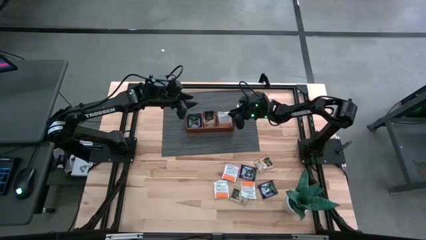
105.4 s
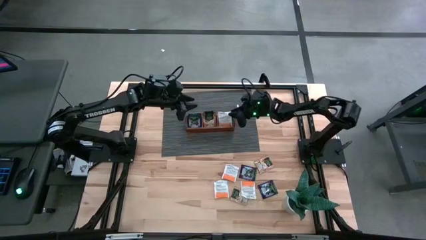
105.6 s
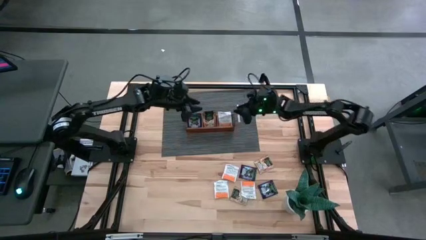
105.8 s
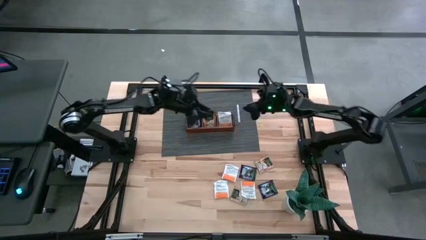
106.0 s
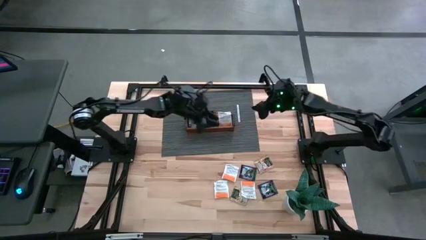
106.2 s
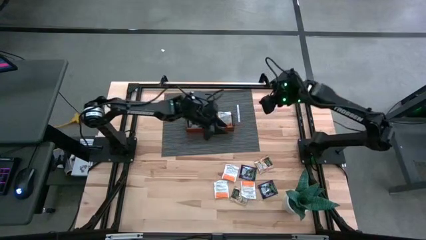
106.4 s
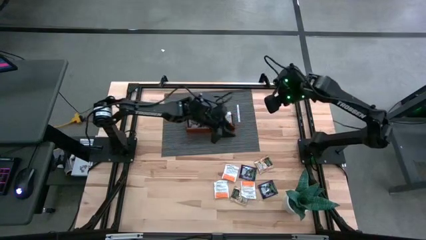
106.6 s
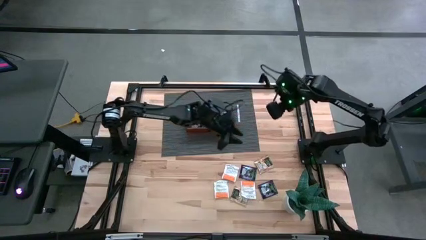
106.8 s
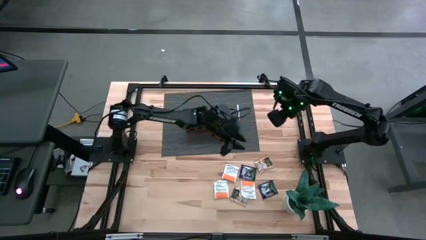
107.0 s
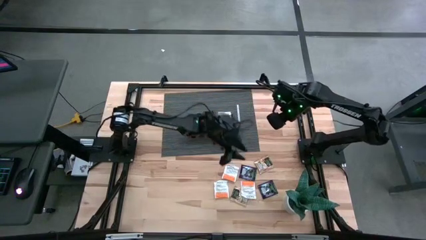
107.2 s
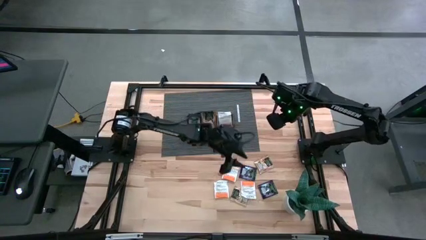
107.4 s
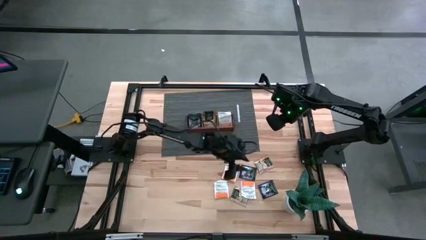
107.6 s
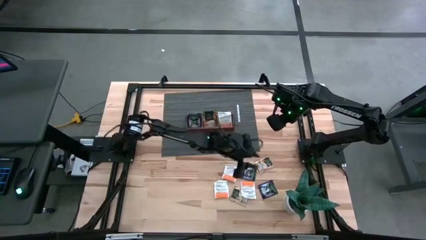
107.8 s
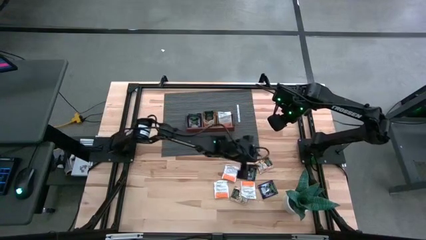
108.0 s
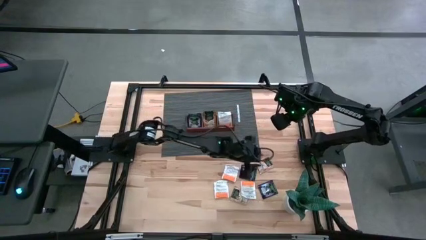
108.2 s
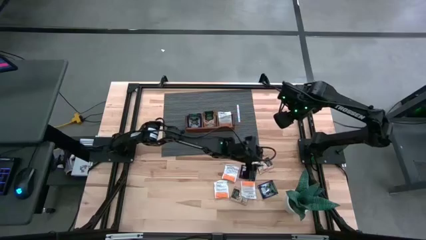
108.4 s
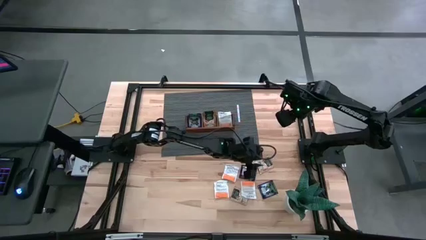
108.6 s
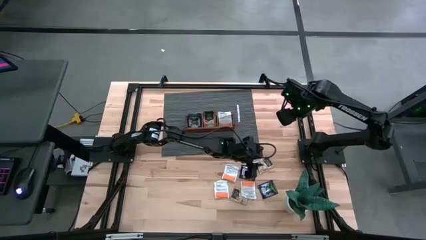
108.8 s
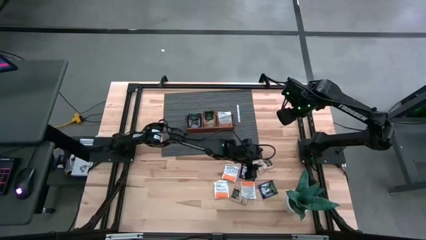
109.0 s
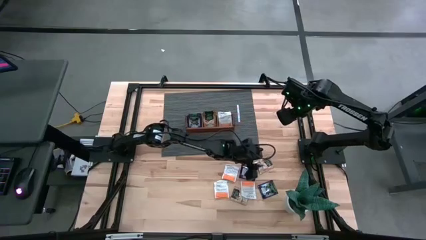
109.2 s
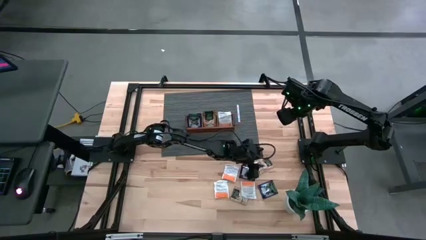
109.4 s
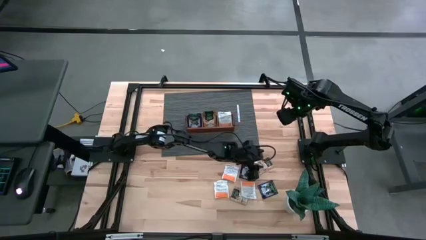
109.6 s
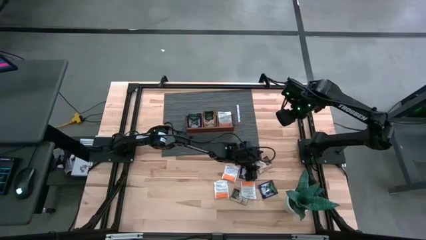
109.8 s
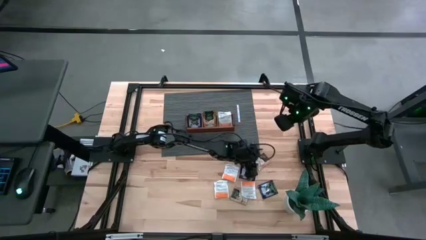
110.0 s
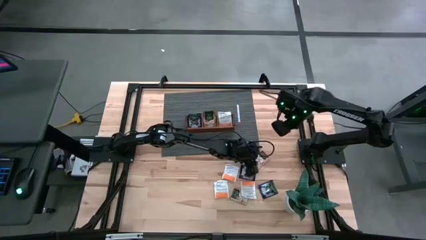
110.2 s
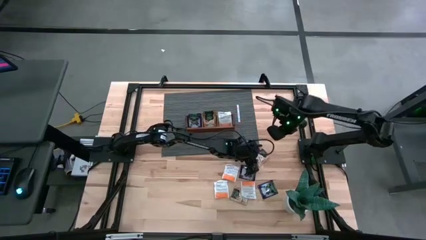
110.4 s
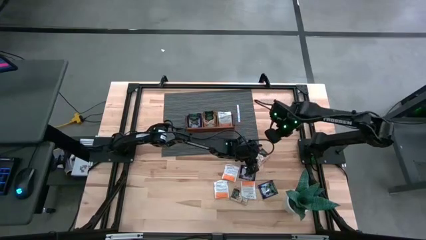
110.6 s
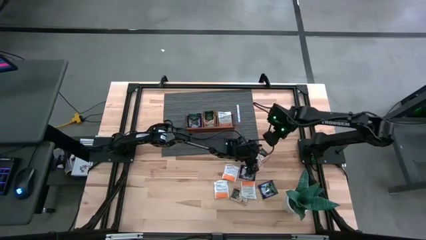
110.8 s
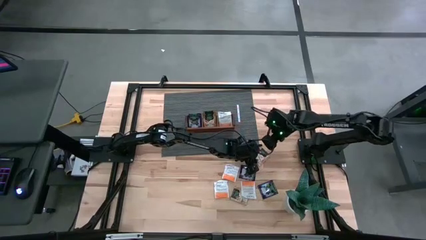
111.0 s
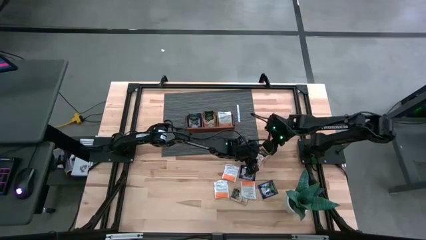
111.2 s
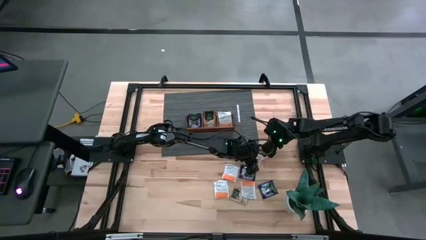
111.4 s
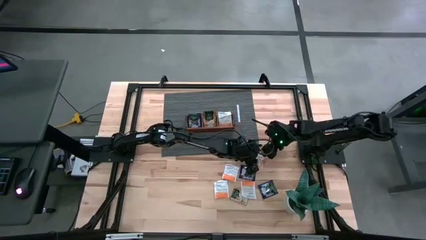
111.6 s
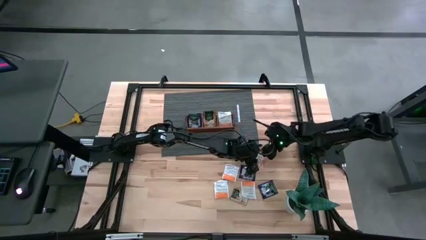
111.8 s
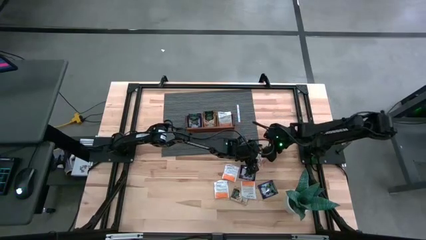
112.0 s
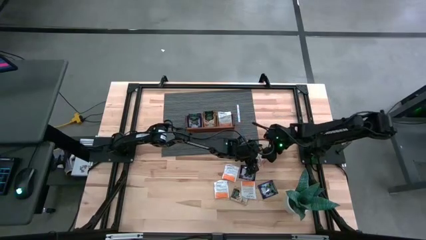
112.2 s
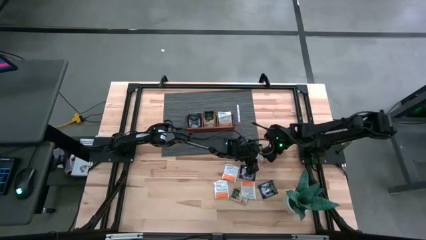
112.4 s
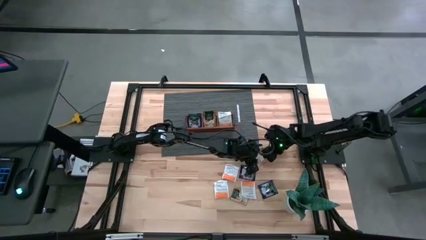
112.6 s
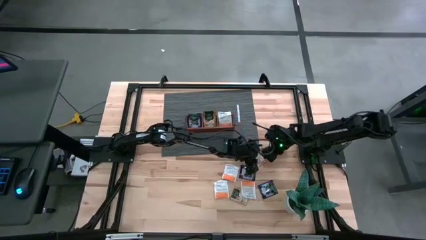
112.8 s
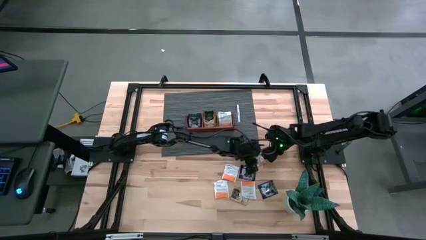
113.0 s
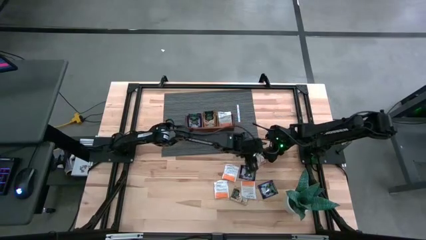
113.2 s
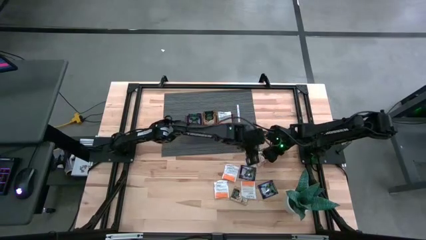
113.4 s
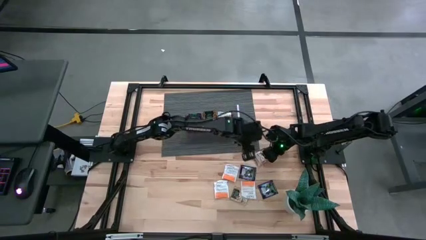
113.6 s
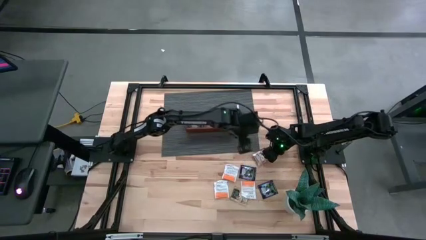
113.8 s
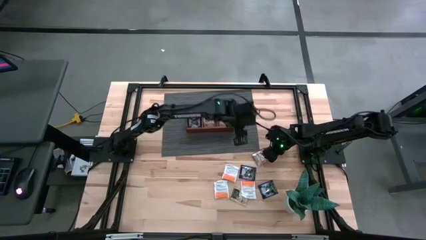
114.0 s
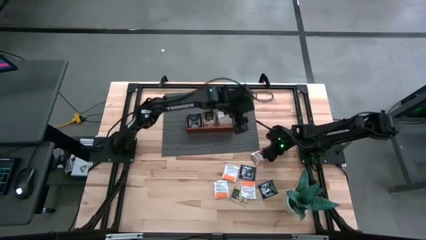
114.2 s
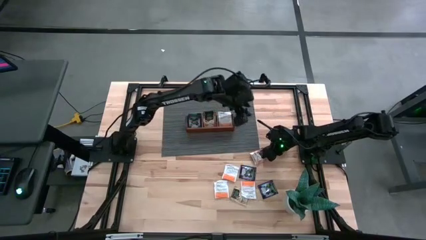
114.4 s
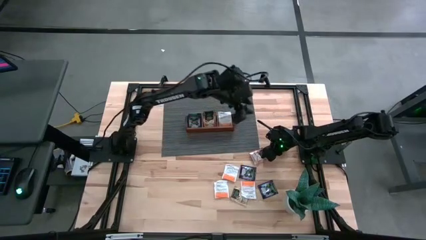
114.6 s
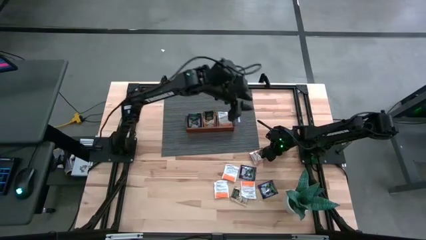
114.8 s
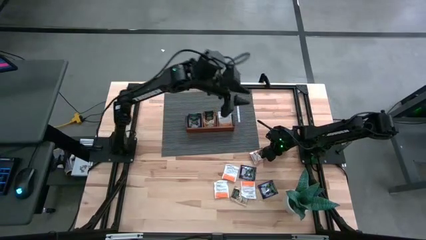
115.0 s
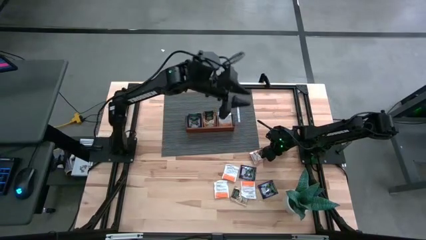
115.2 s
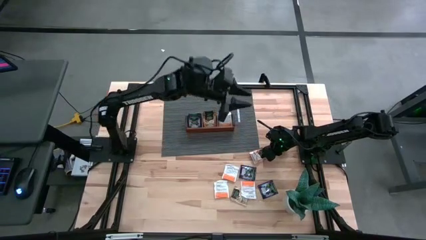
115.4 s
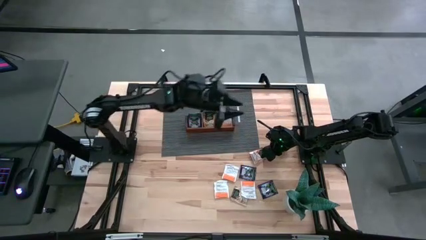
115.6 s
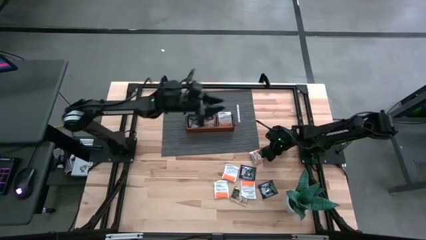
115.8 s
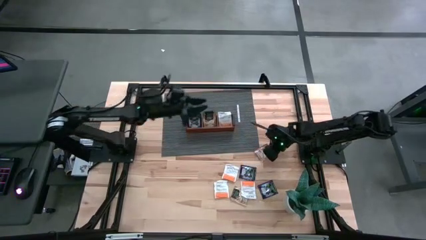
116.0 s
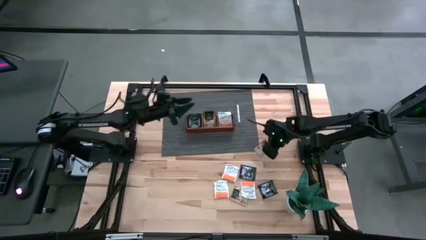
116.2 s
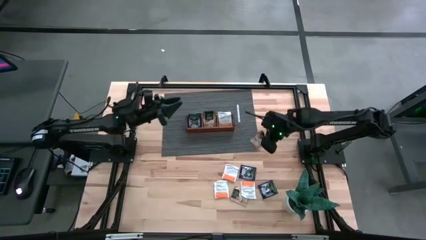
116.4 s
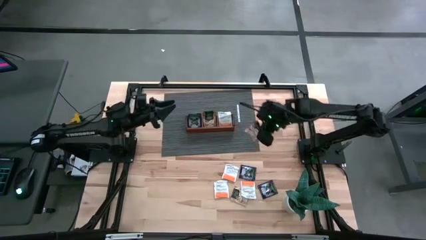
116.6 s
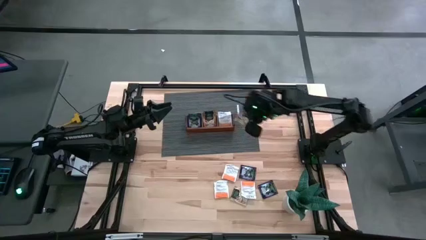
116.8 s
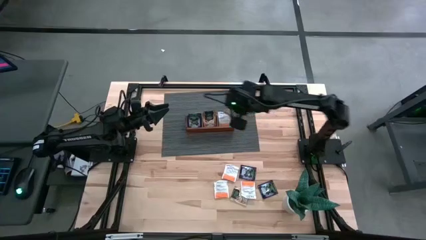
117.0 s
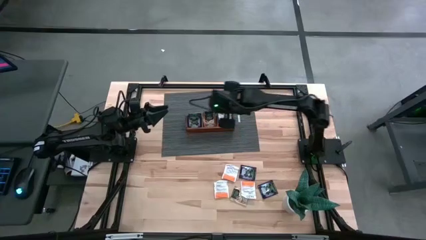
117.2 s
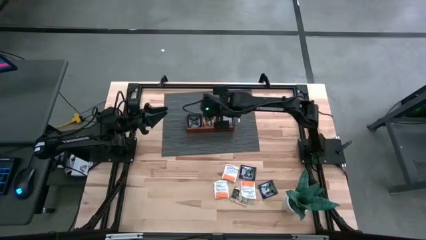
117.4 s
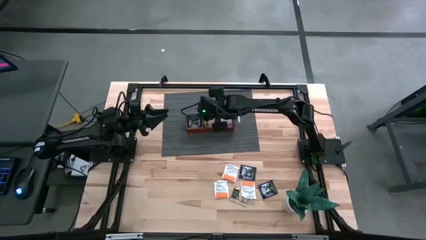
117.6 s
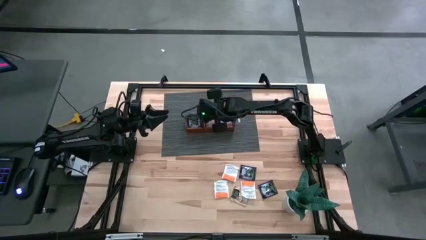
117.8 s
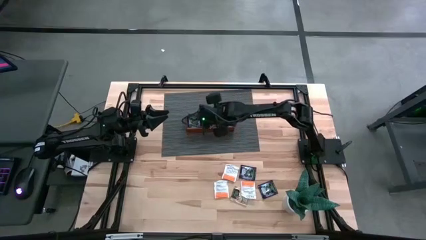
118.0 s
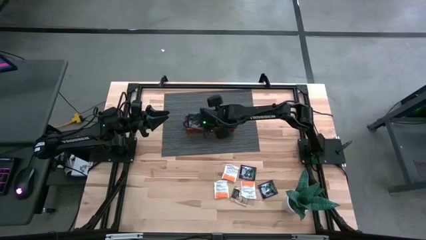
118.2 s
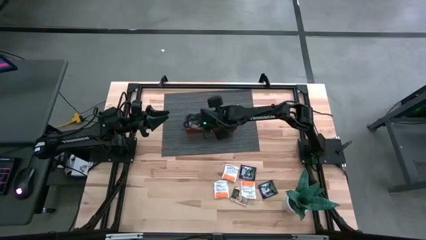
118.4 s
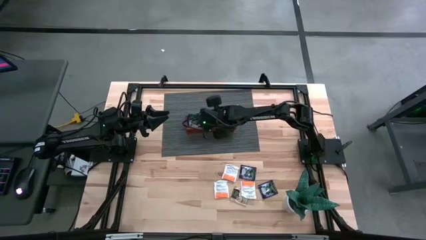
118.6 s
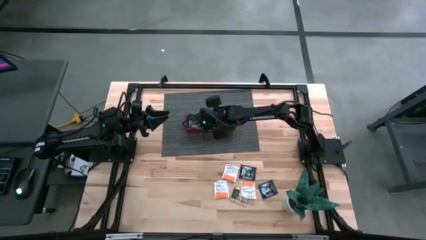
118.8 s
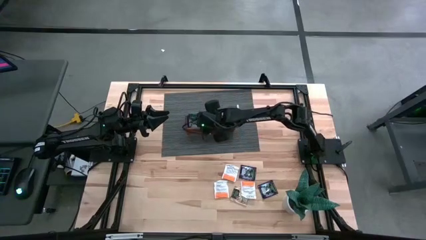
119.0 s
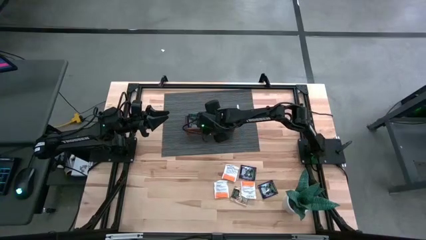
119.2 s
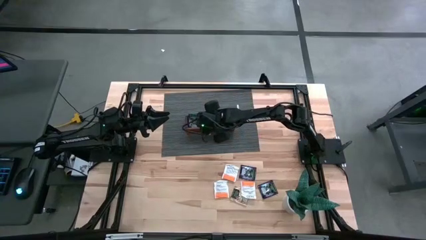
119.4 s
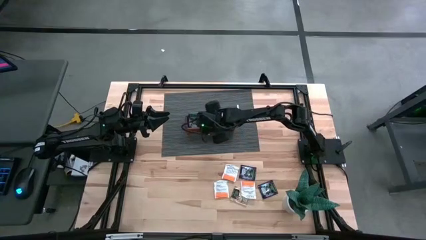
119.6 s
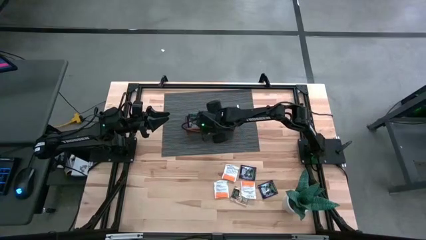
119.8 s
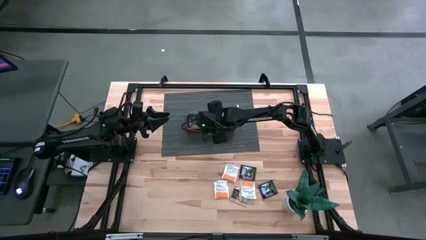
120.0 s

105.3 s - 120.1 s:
Task: Pick & Place Tea
Put the brown tea bag into the middle section of the wooden organizer

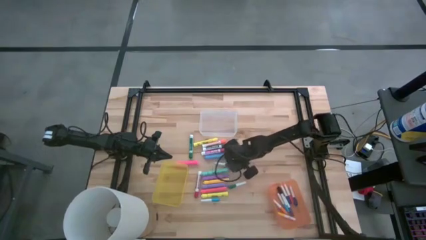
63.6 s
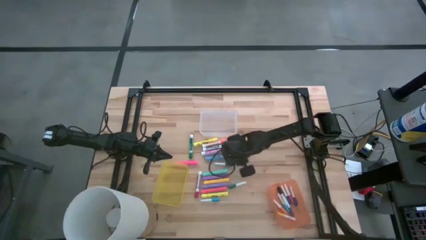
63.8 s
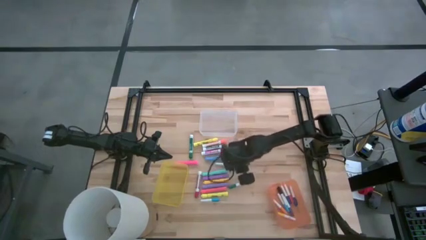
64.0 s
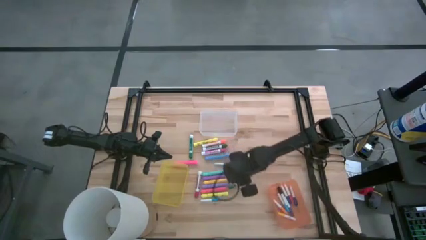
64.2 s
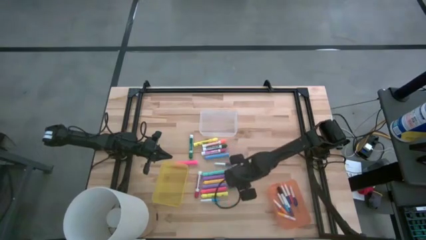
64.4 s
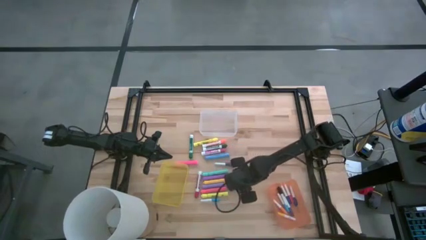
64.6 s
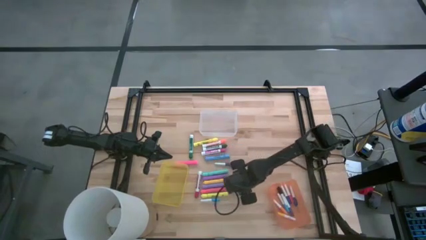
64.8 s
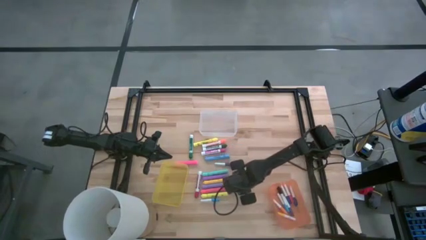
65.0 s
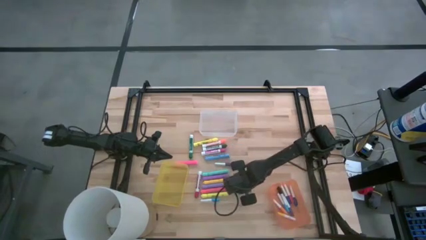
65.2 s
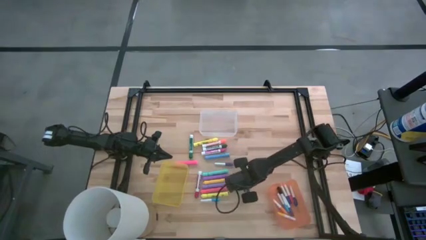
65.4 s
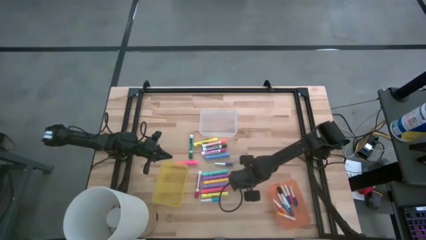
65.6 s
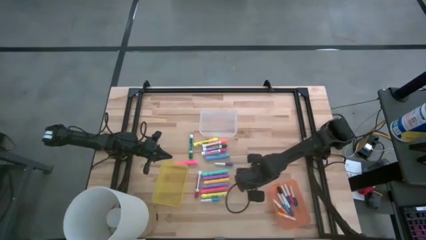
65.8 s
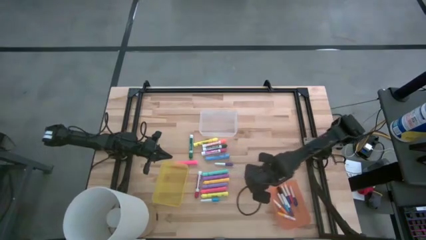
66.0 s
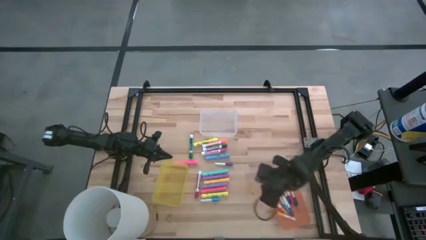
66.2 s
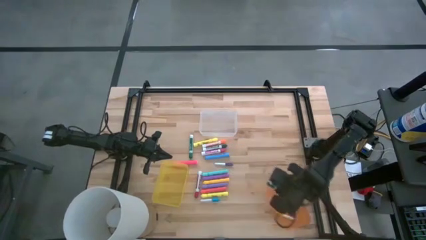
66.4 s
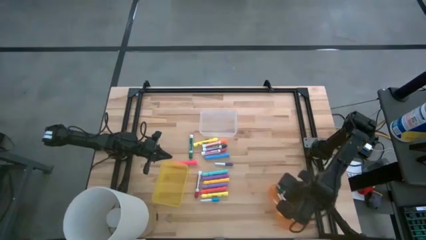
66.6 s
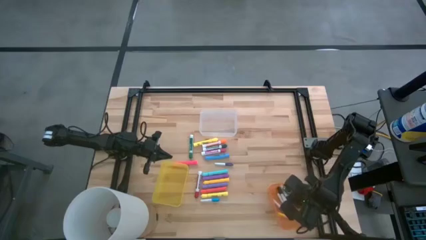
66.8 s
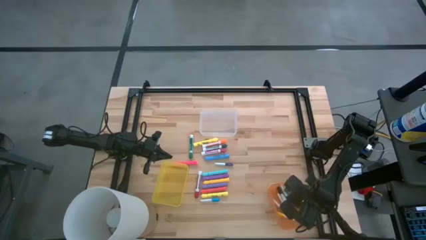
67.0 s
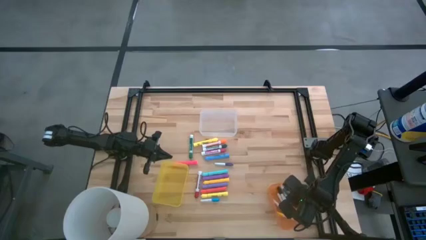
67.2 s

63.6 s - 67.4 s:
Task: Pick & Place Markers
Put the small green highlighter pen into the orange bin
